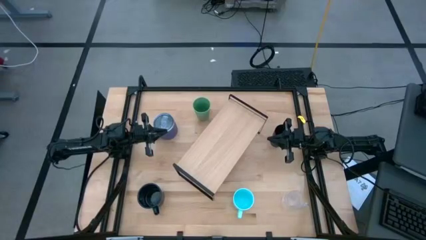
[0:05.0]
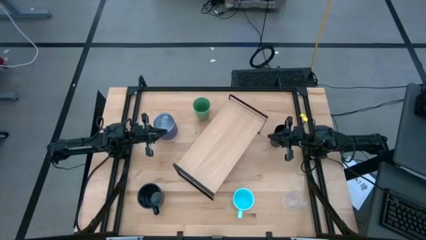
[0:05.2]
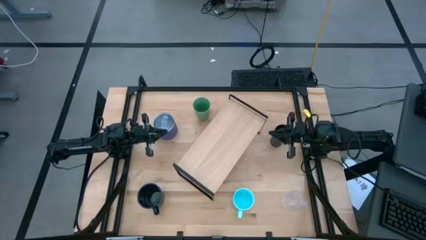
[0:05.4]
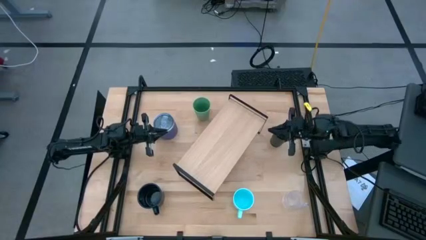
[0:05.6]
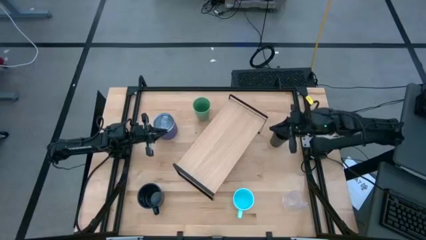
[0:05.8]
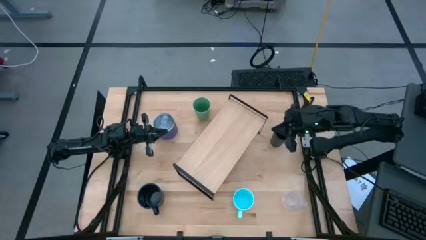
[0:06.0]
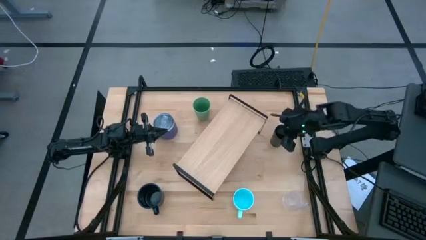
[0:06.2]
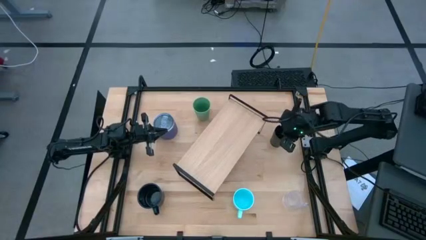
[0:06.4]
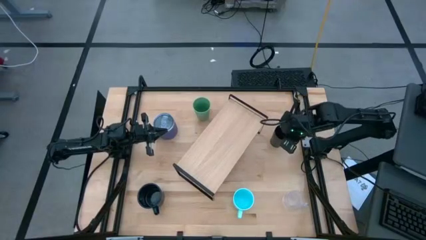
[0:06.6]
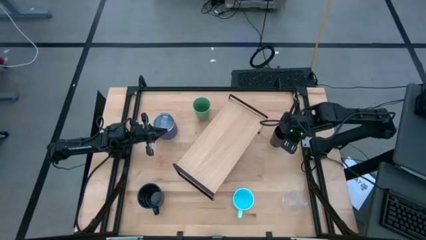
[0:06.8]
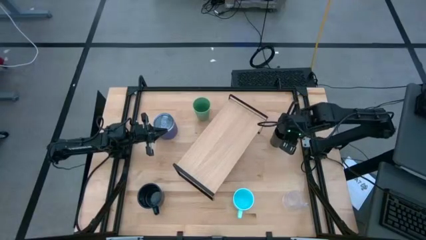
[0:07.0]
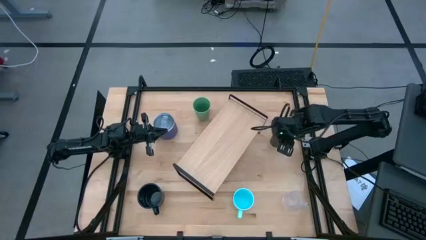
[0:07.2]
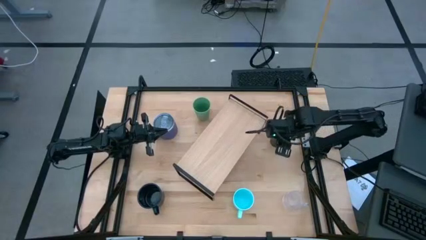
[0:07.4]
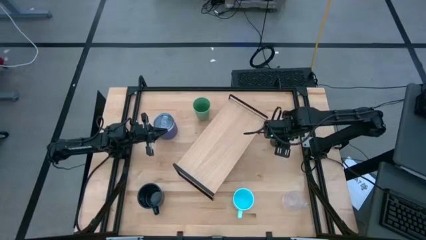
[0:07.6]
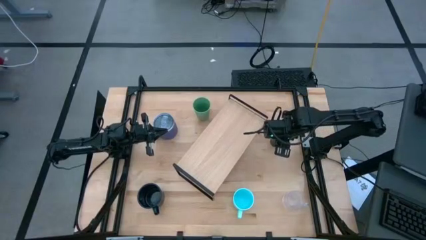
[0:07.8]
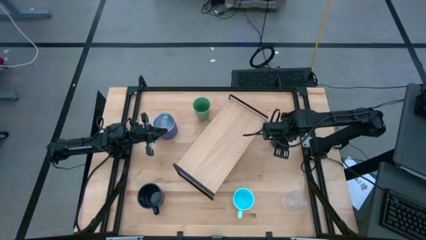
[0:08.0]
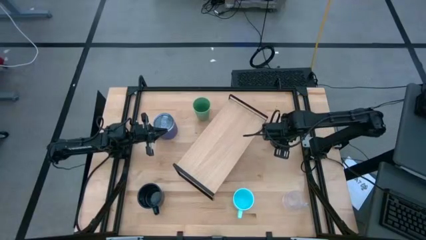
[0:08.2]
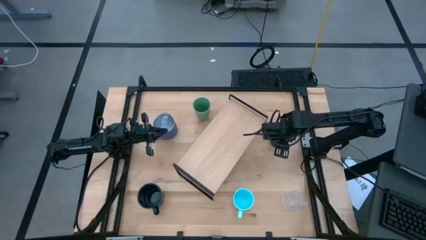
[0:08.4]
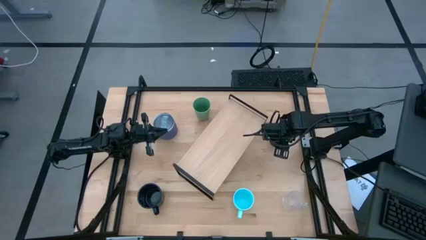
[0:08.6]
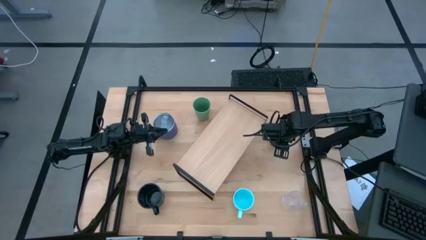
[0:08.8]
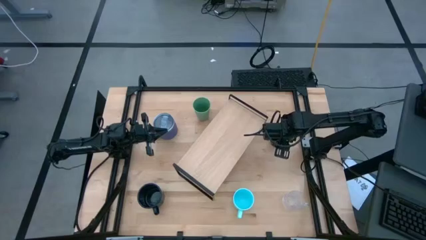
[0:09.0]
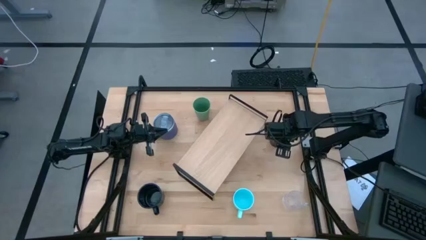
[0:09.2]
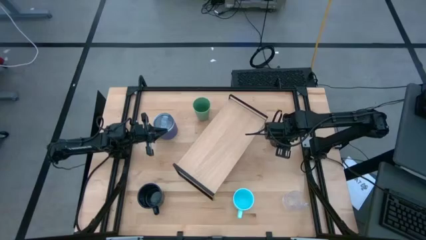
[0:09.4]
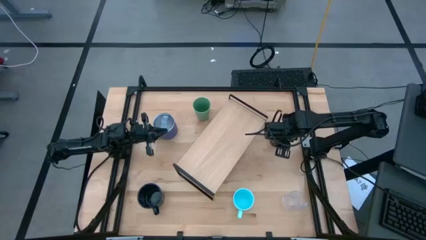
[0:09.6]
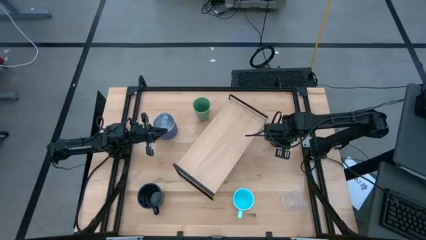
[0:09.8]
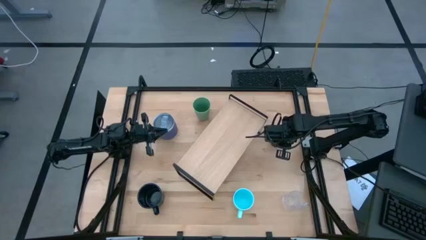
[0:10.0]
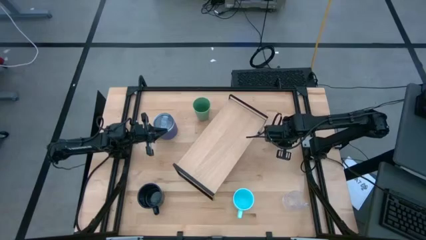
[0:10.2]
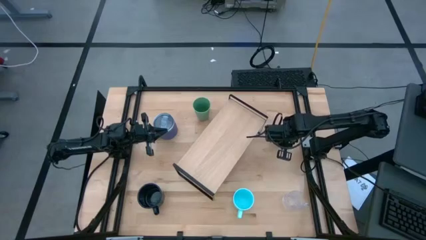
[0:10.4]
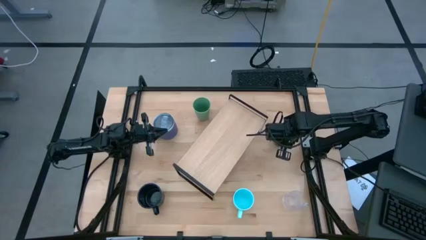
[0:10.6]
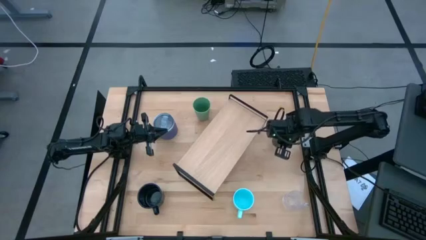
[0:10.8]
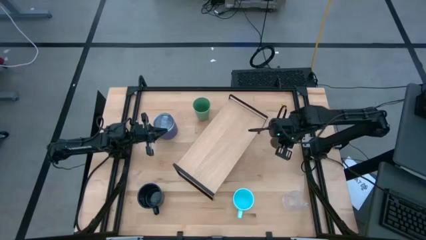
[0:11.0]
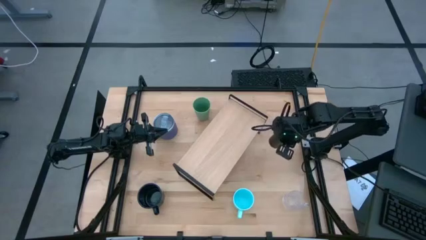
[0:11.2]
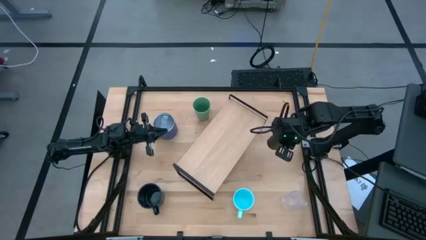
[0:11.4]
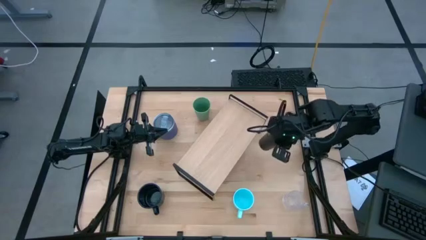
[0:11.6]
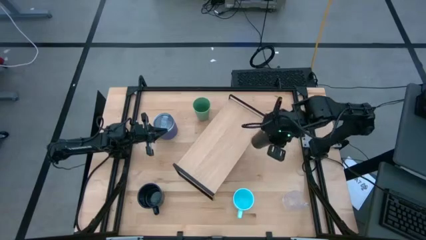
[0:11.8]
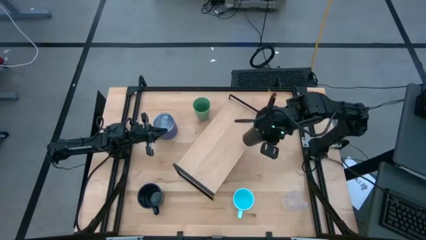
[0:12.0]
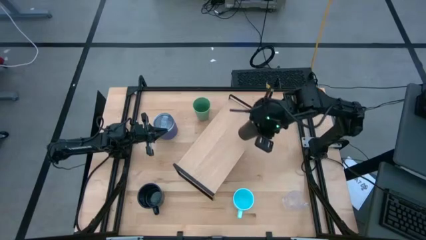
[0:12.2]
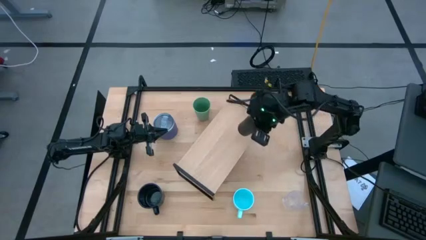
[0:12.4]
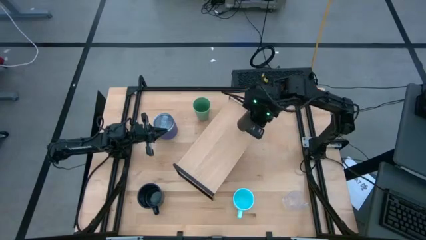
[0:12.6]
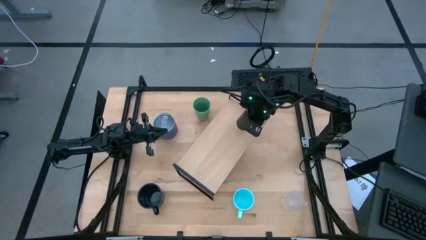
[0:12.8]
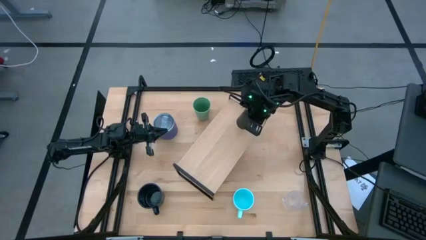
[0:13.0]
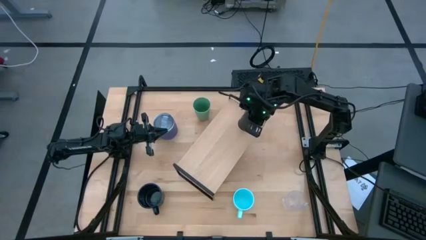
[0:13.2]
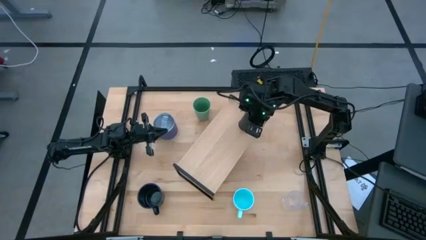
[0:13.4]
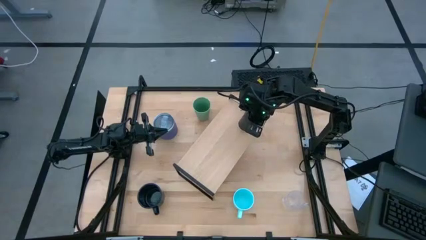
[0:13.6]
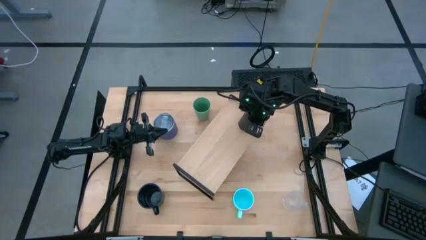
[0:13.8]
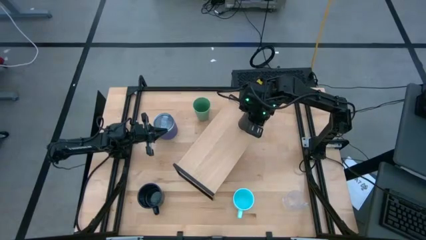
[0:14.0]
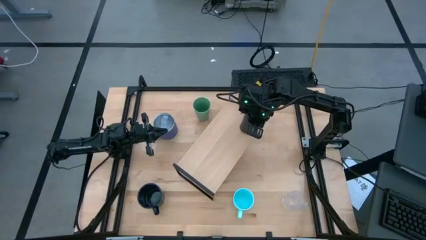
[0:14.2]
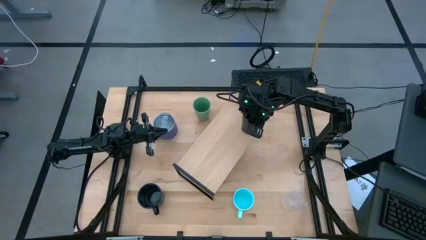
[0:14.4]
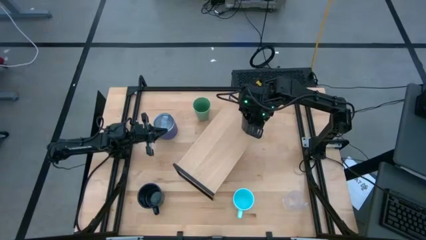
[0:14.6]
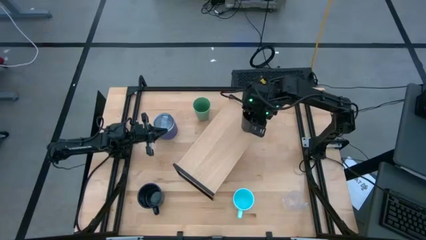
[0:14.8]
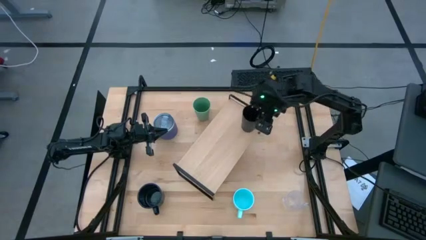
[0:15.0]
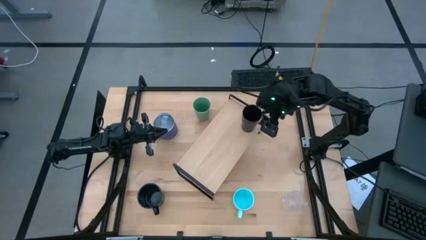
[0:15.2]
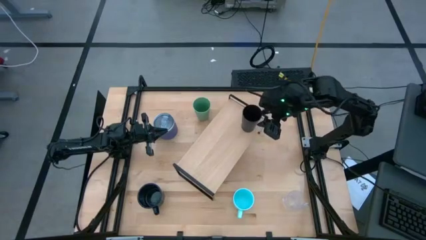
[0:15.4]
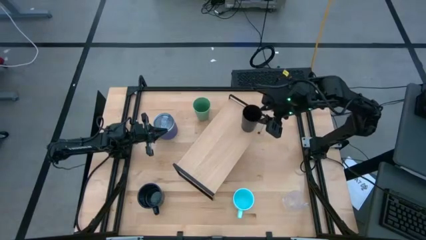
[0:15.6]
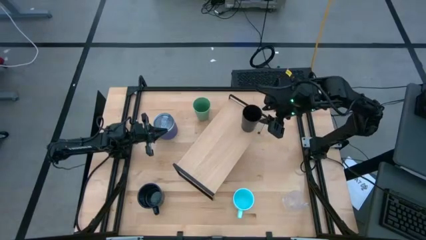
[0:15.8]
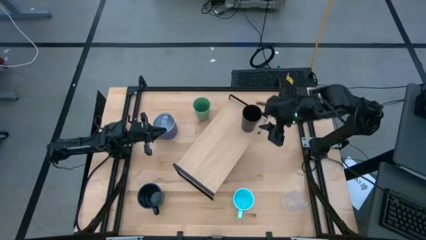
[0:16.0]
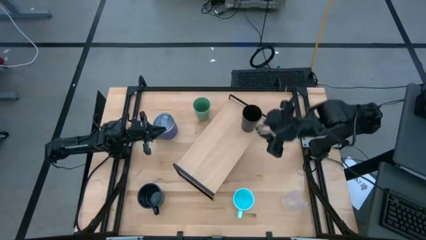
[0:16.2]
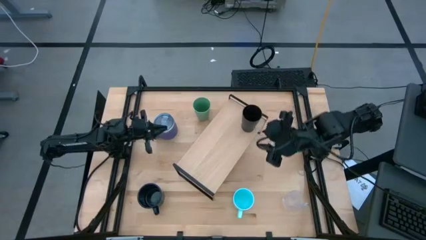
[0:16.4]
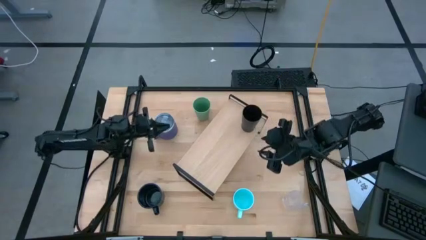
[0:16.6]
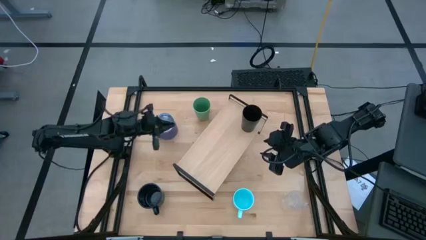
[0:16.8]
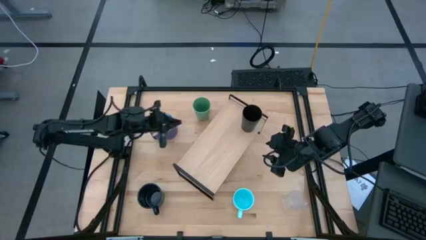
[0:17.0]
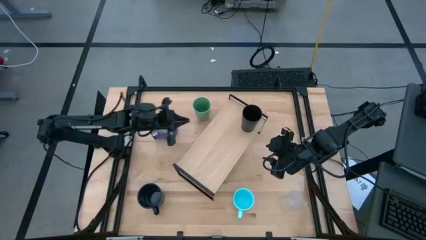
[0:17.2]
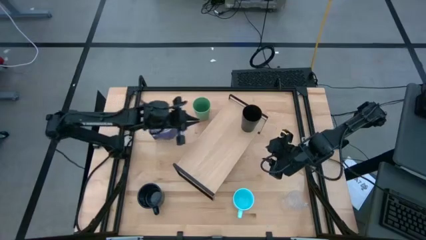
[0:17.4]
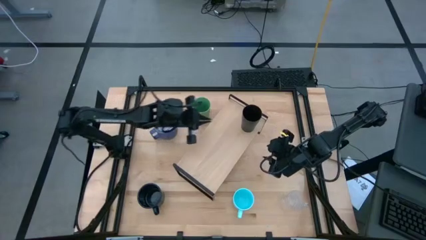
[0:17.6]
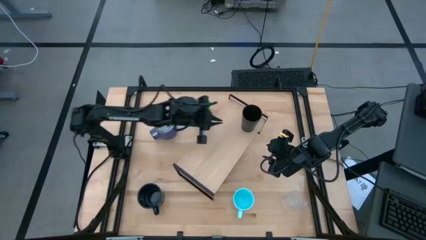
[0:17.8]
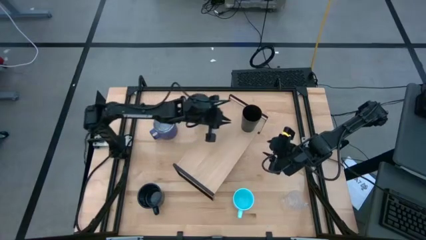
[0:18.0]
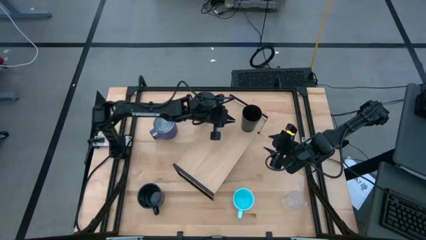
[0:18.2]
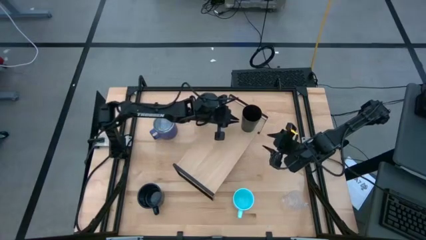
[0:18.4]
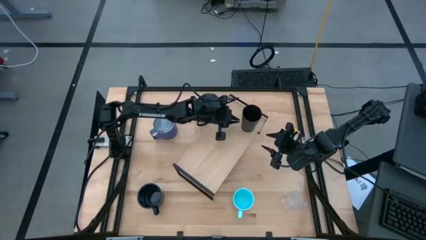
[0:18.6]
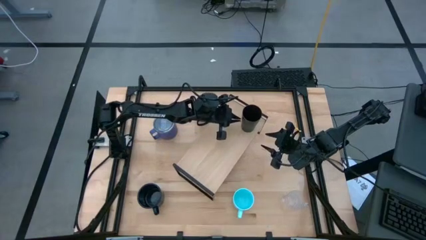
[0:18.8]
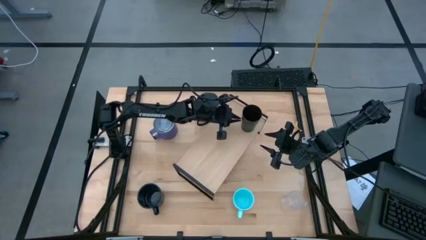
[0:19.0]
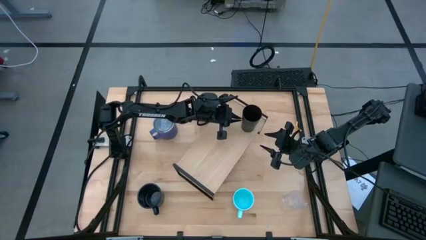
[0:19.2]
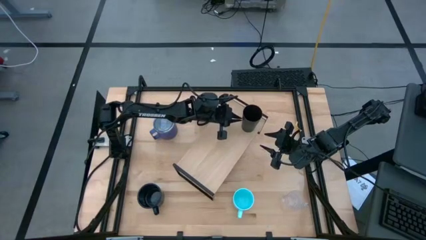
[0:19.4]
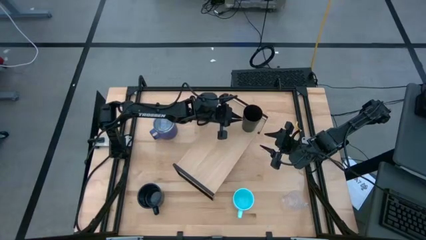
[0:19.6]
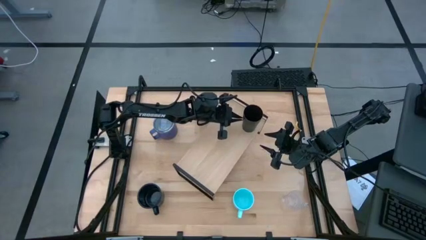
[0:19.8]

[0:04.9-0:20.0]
Task: Stack small to large cups/mugs on shelf
Put the black cup on the shelf
